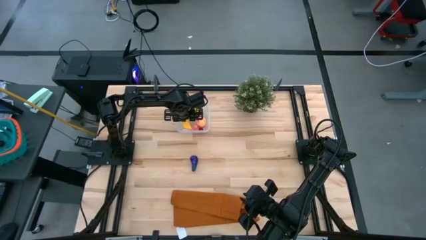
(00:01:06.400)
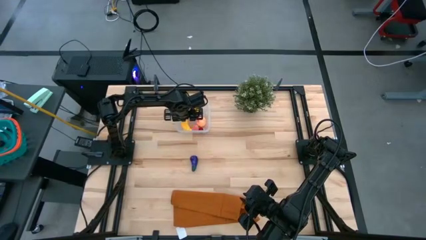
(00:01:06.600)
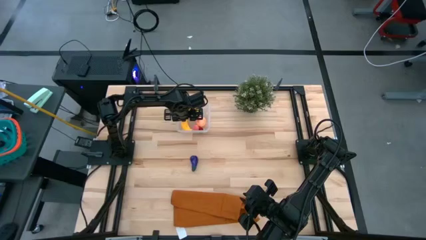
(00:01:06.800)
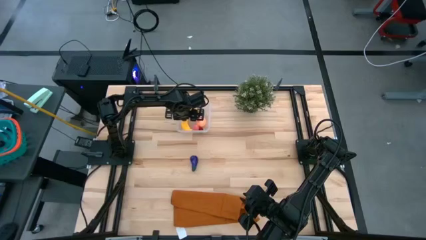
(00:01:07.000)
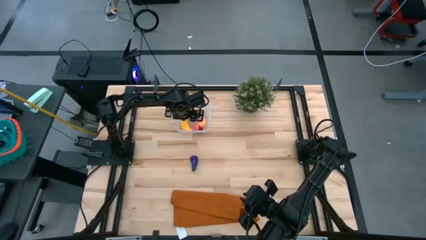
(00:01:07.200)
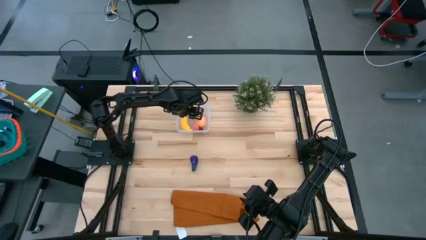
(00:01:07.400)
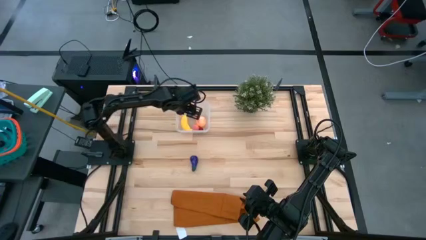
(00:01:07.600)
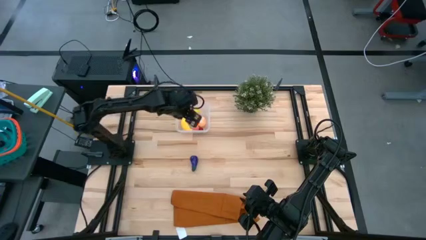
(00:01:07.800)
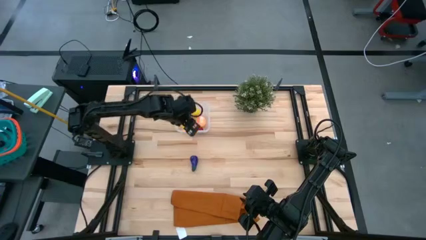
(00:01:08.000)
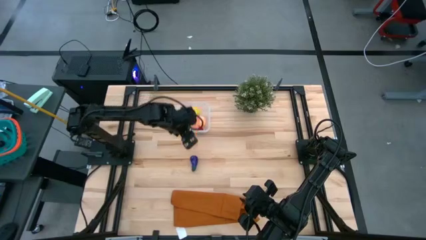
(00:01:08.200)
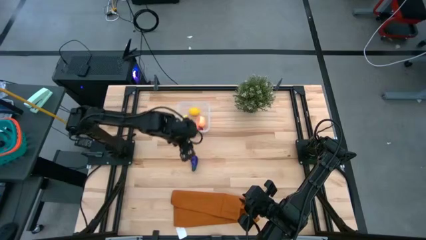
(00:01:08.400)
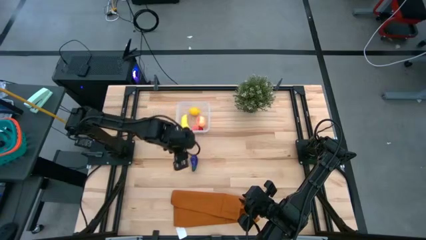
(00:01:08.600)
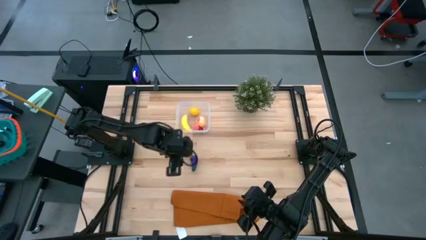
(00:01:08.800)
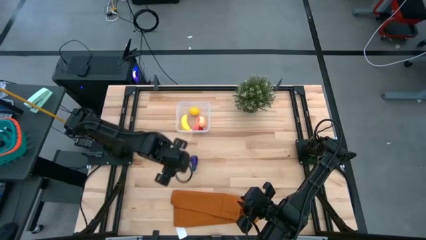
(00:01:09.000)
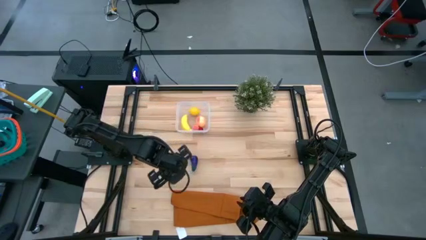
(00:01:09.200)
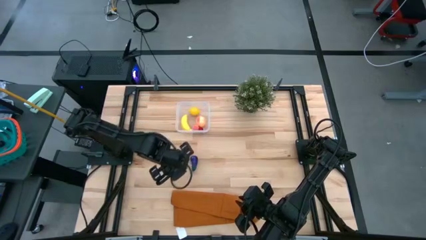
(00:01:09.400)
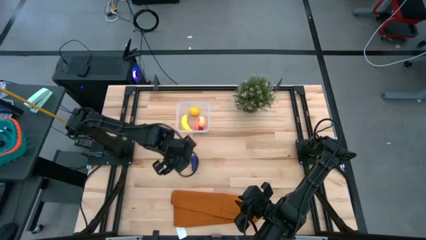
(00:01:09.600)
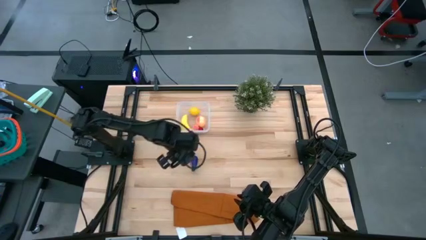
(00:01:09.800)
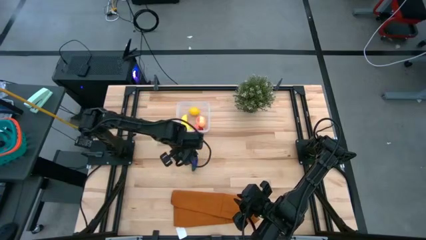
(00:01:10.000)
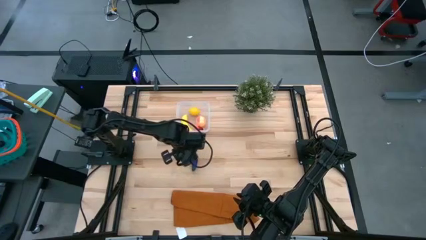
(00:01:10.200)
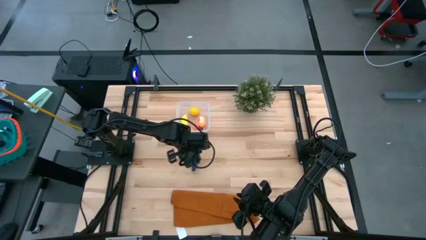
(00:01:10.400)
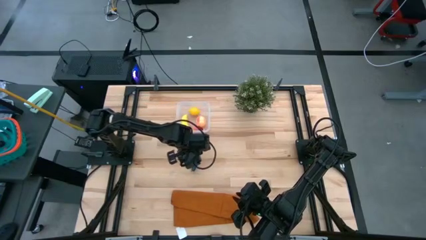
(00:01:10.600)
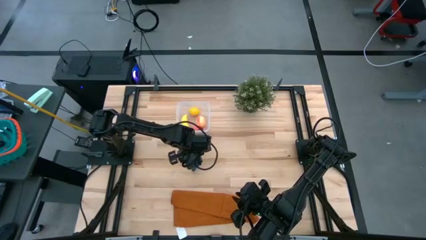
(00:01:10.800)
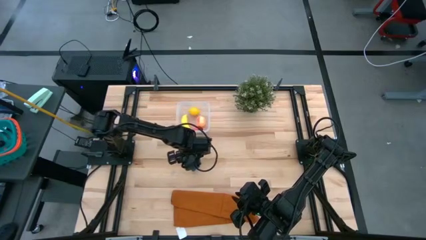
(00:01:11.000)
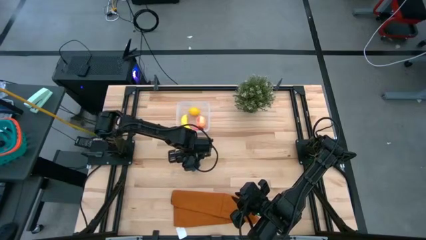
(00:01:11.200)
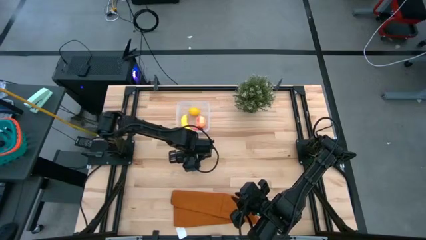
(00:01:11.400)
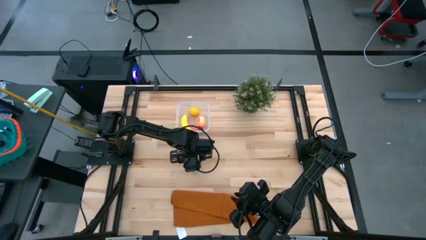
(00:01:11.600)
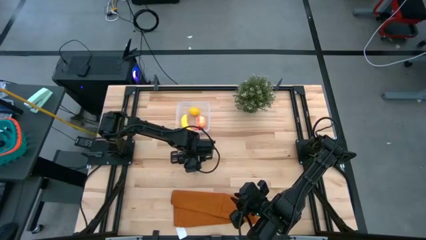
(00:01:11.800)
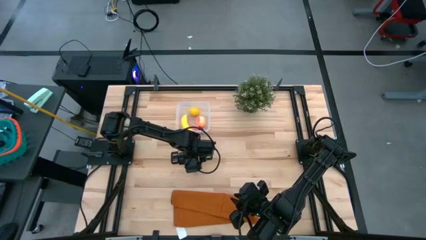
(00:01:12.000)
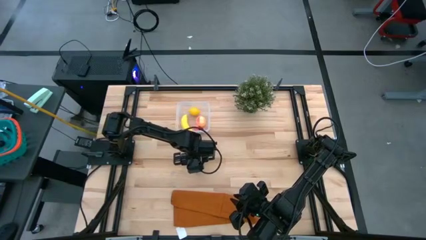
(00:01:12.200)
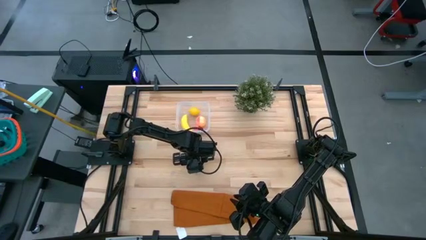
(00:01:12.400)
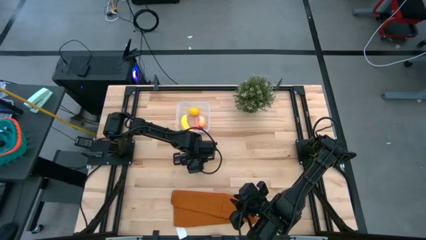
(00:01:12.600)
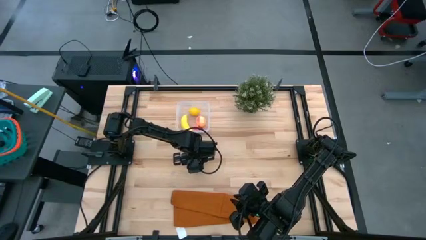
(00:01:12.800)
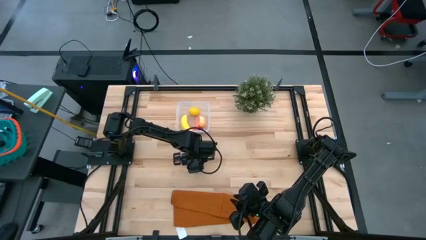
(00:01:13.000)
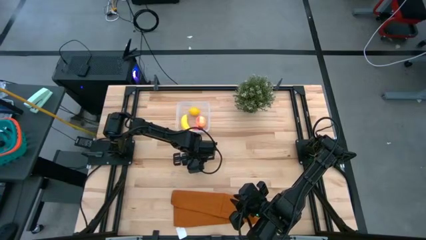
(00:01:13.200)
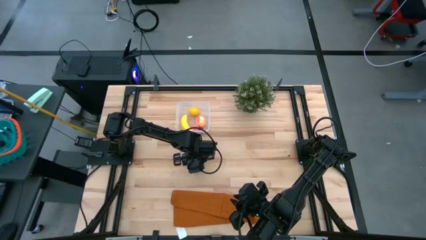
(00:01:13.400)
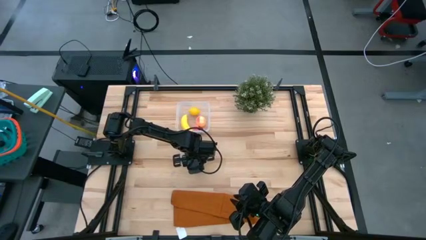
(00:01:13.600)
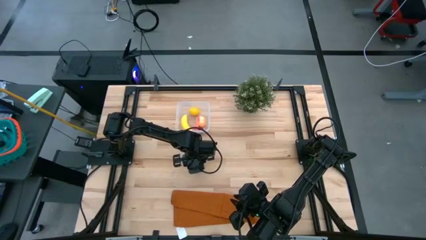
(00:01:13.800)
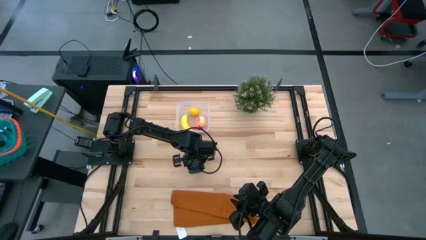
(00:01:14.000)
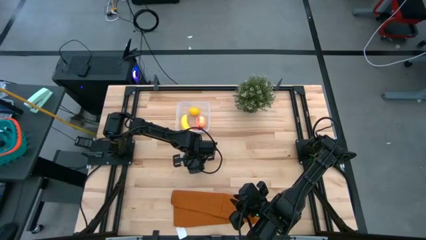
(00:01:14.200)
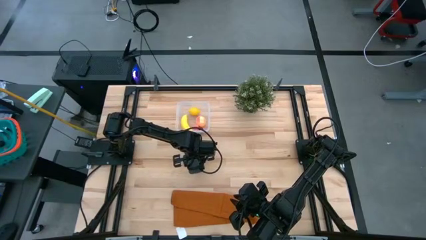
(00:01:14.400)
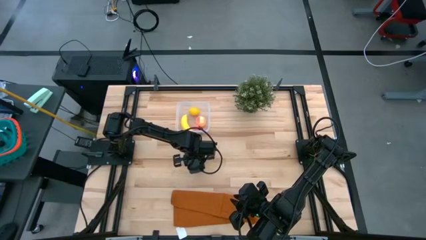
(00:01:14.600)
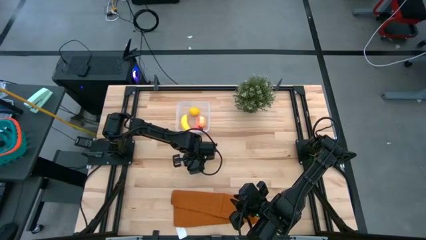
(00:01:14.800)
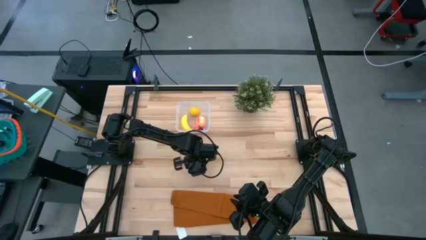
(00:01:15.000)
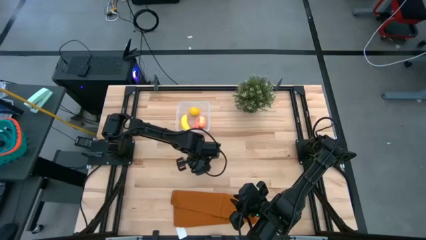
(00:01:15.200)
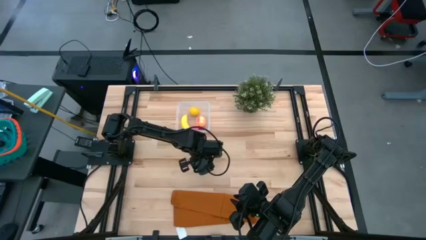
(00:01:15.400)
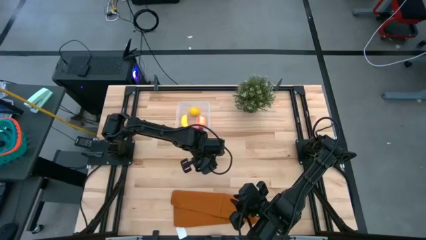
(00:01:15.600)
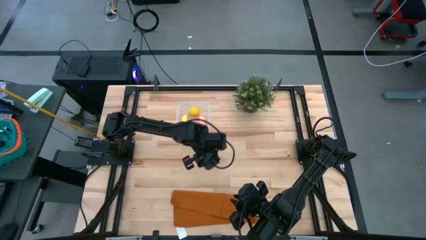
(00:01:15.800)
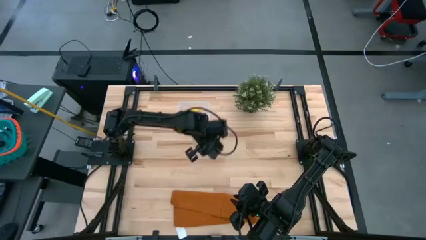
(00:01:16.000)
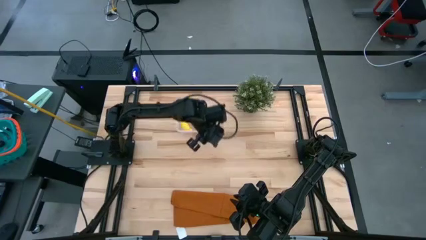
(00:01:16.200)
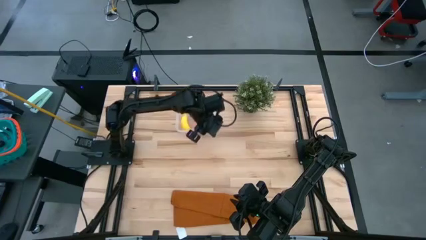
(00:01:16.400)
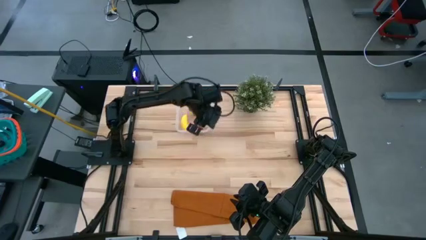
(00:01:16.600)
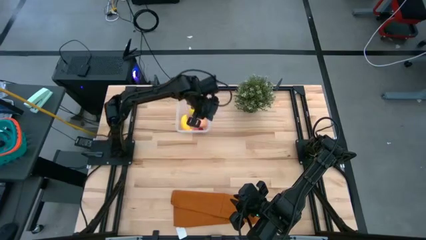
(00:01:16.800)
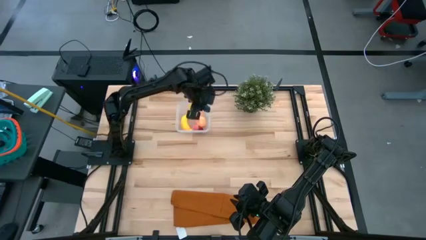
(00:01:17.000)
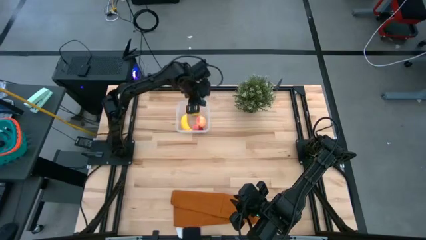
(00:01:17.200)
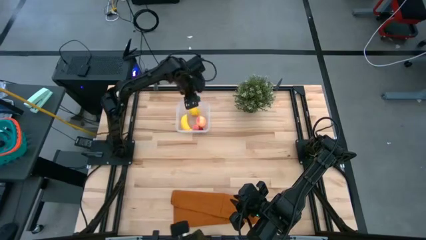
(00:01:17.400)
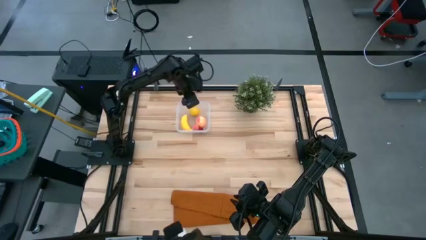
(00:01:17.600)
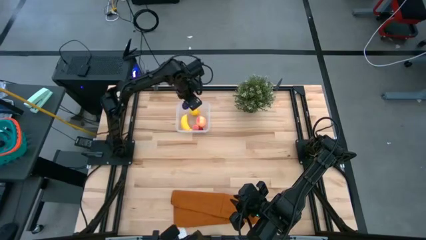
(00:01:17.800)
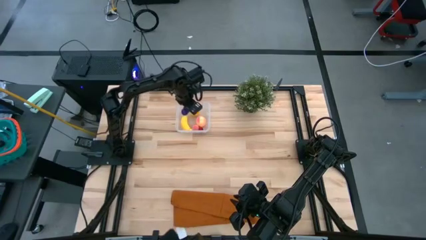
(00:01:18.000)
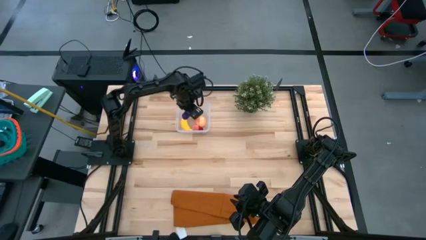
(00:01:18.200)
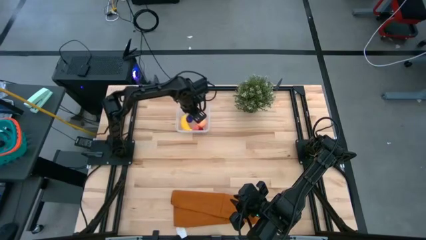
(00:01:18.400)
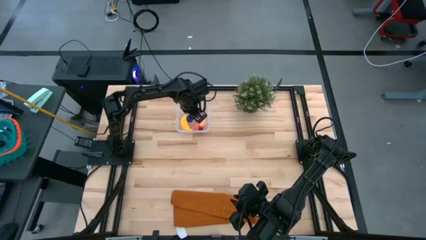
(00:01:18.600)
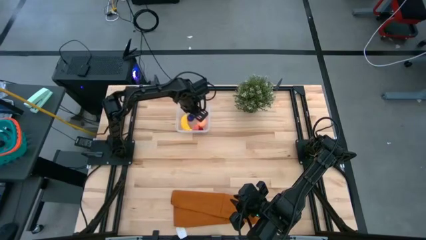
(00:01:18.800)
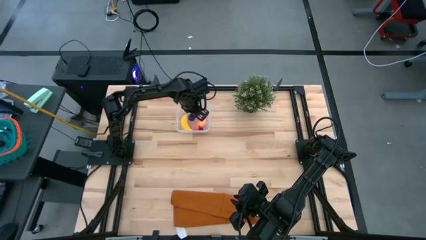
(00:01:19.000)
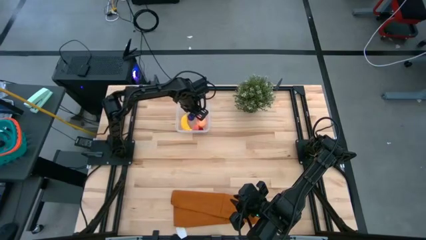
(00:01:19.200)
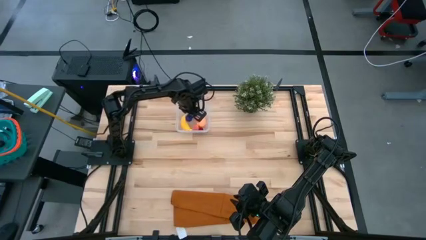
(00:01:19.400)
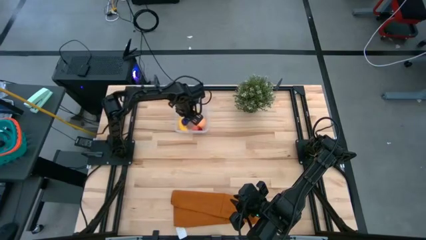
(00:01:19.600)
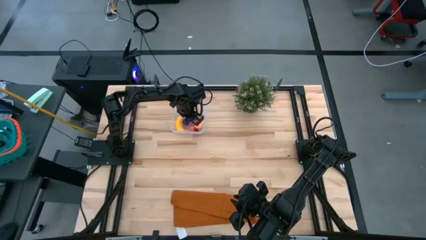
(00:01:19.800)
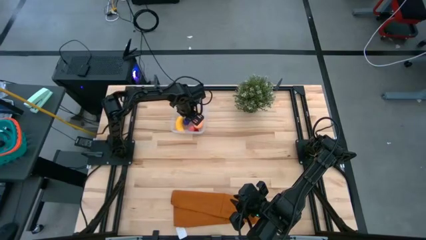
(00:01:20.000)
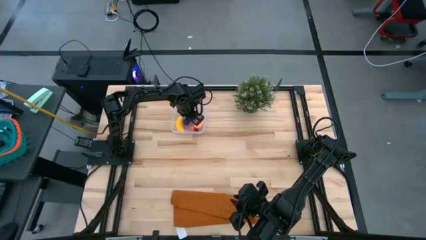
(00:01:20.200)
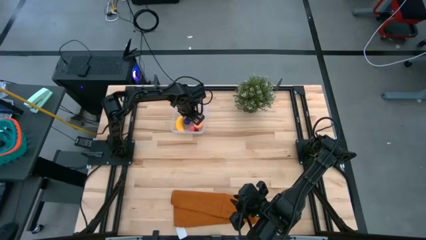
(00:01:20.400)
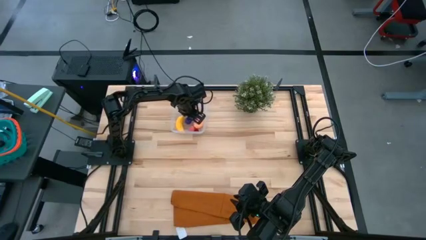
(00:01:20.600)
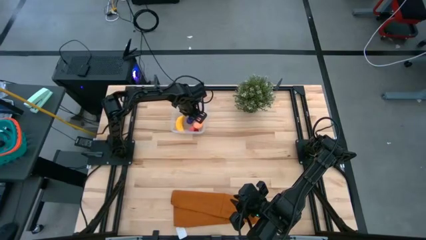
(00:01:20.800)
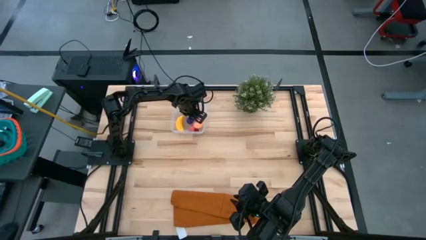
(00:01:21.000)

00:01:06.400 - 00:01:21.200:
Task: Pick and placing Produce into tupperware
Put the eggplant into the container
